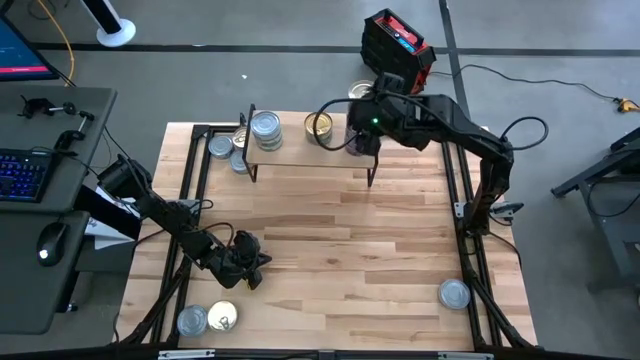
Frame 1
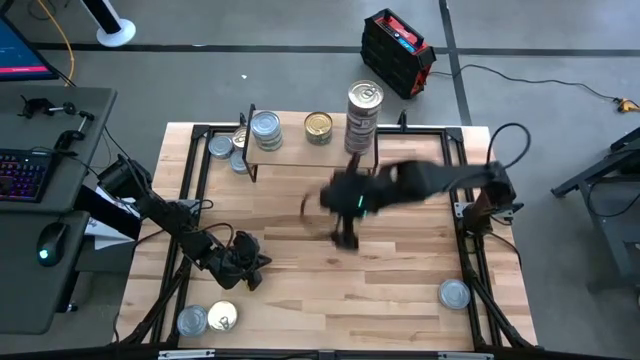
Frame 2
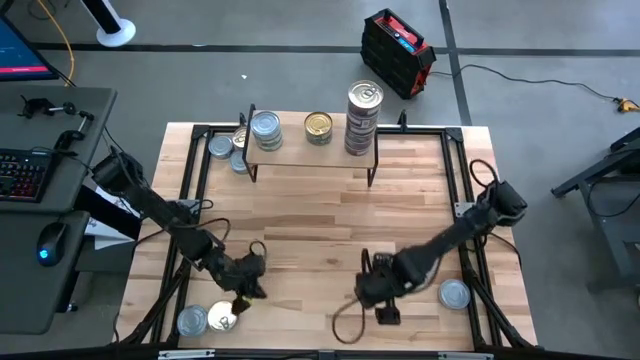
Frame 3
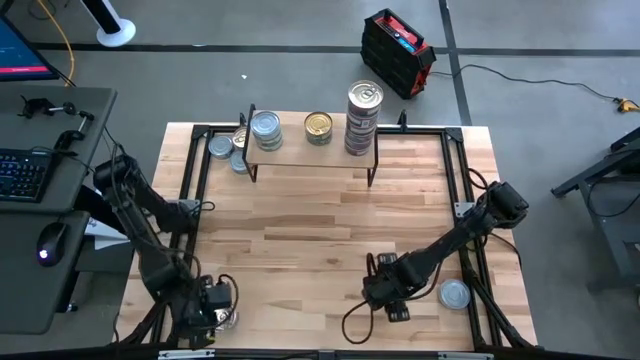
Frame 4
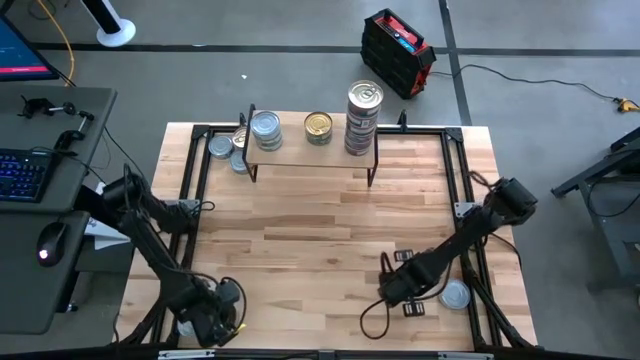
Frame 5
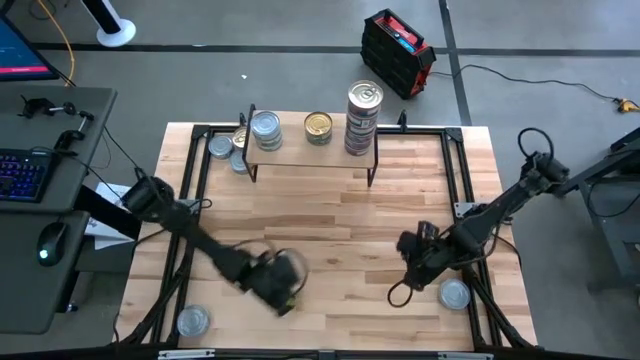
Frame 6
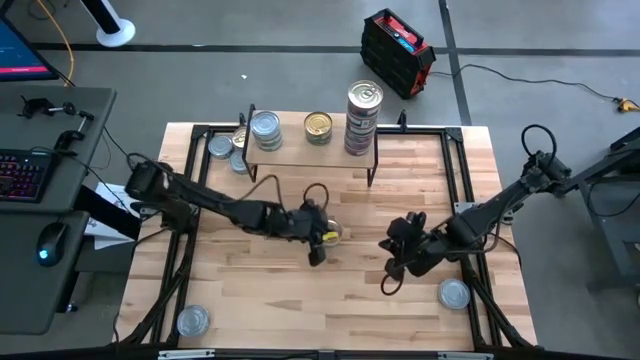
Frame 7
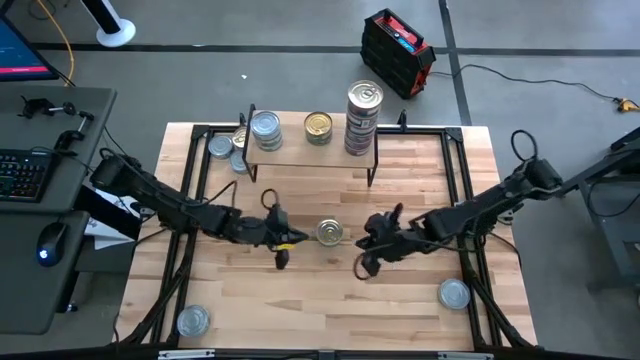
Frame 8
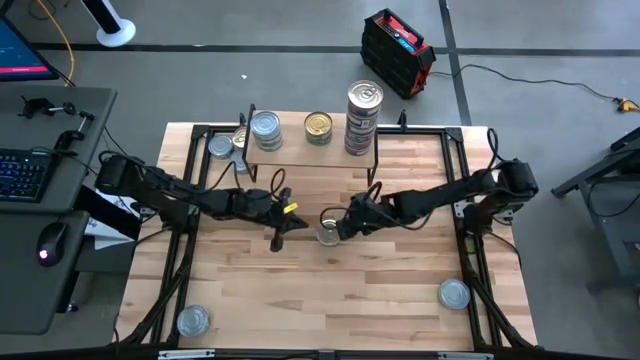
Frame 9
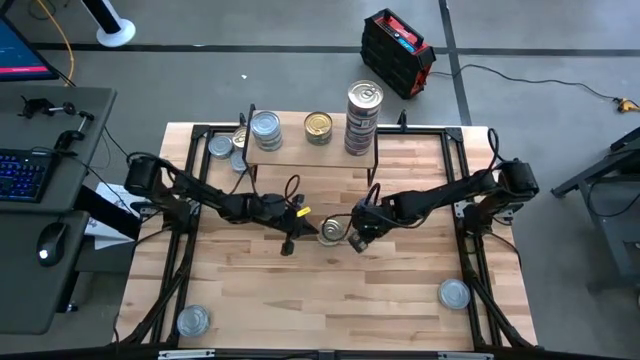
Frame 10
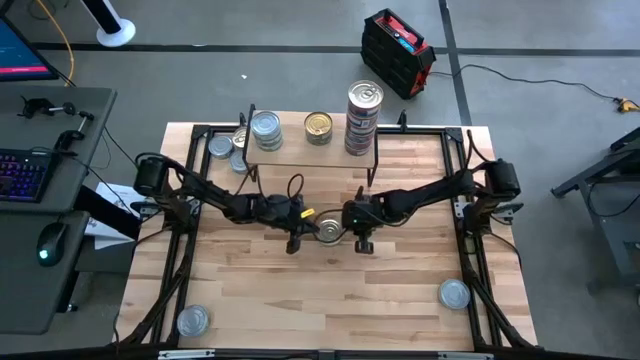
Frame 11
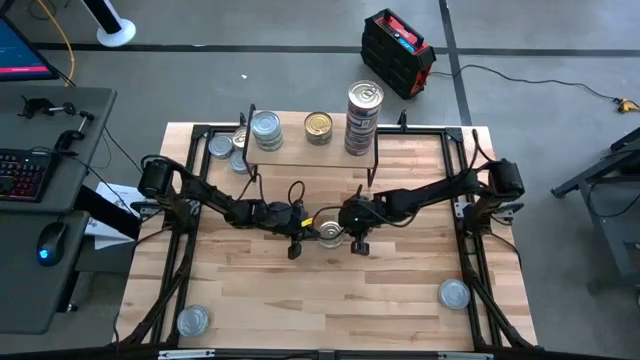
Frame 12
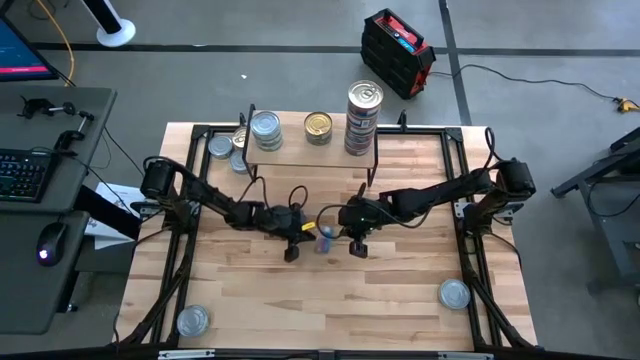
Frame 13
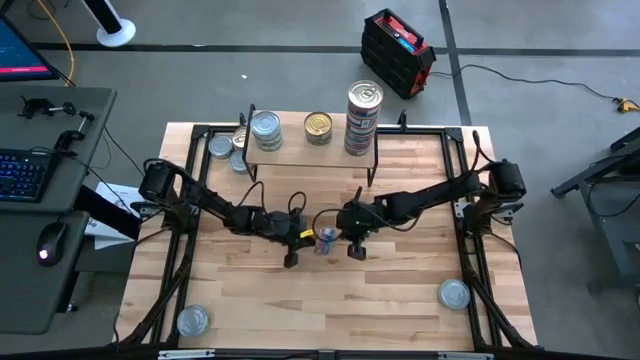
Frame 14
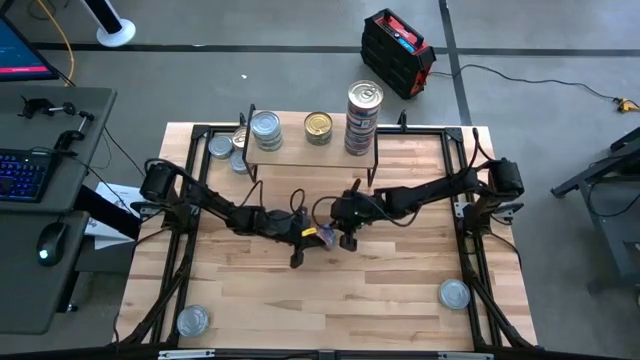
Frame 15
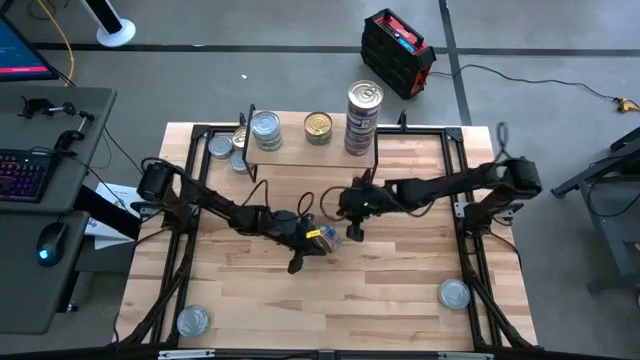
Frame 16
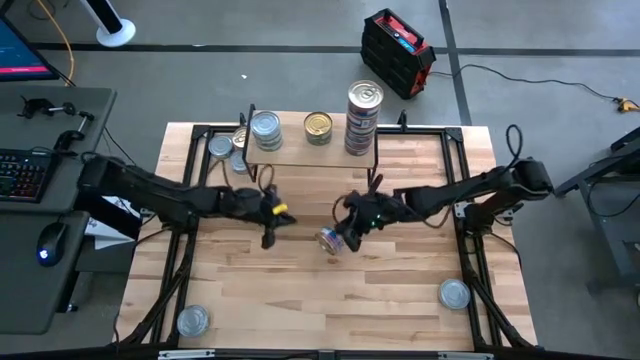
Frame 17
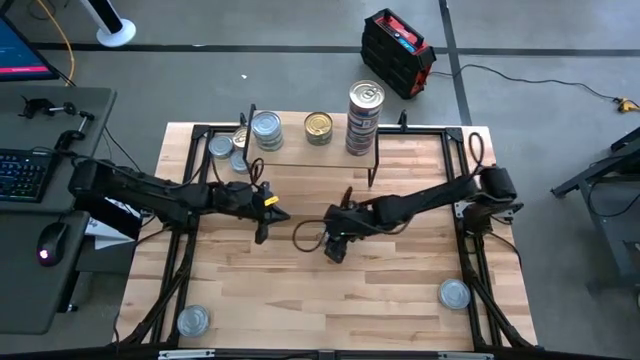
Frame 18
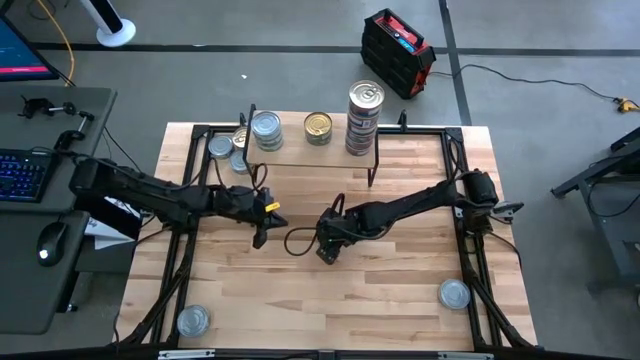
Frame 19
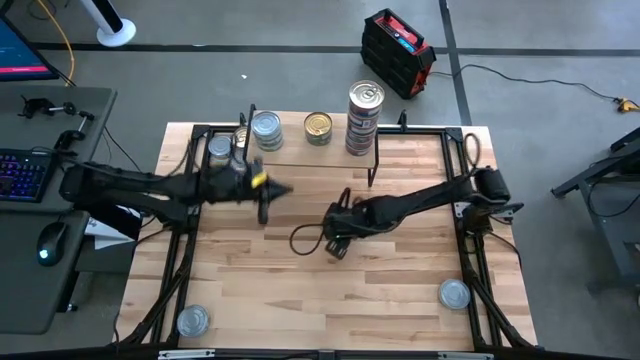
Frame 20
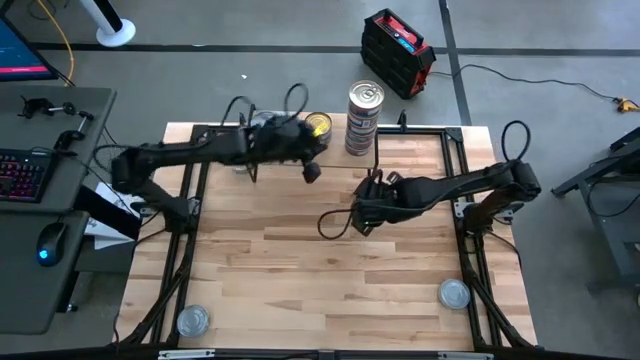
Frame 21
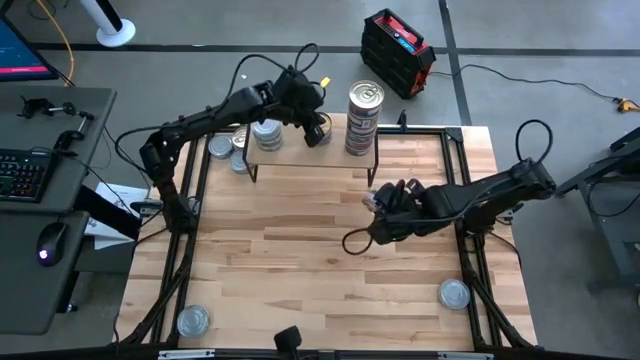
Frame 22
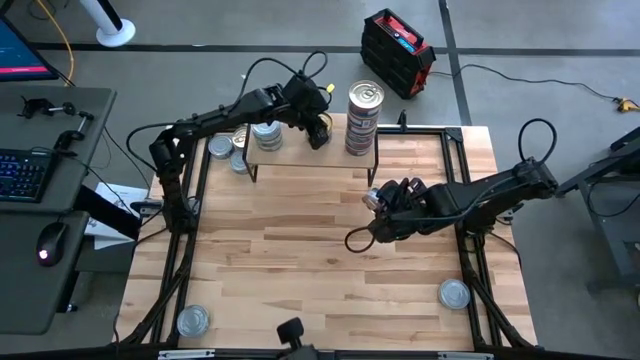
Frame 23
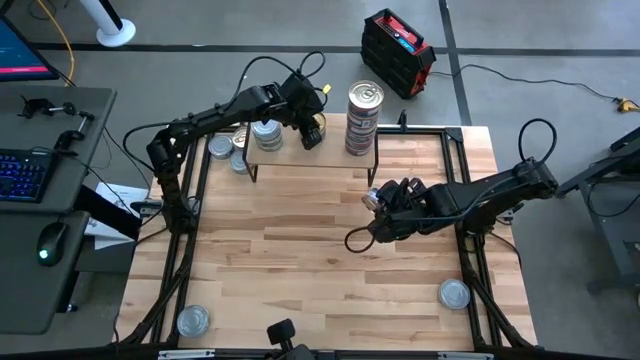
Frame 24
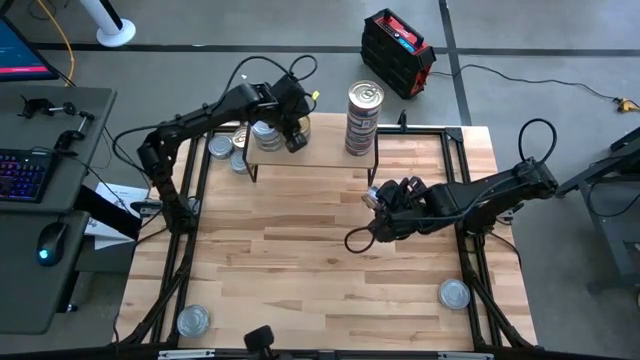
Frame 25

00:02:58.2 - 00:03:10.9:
Task: Stack canned seafood by type on shelf
Put the blue pink tuna can on the shelf

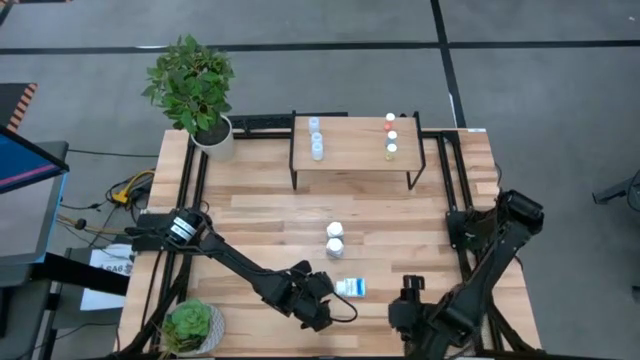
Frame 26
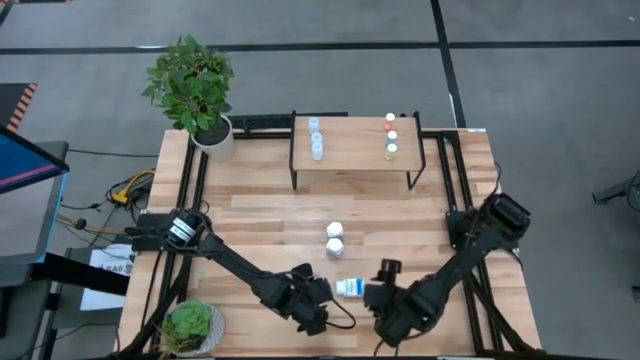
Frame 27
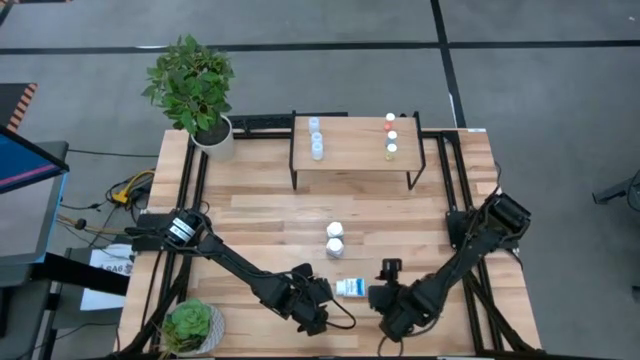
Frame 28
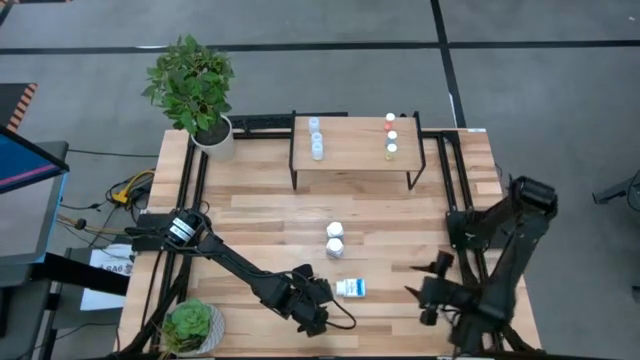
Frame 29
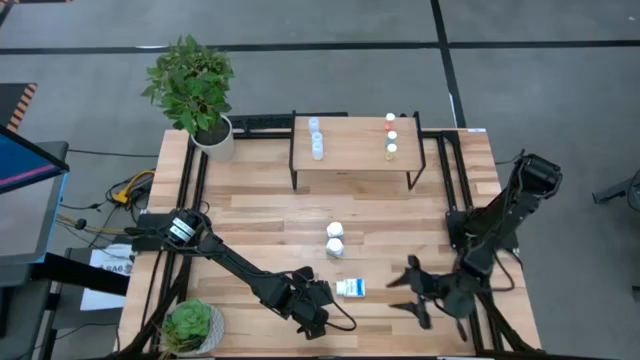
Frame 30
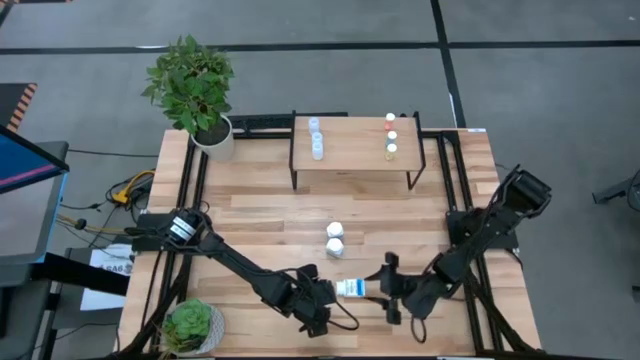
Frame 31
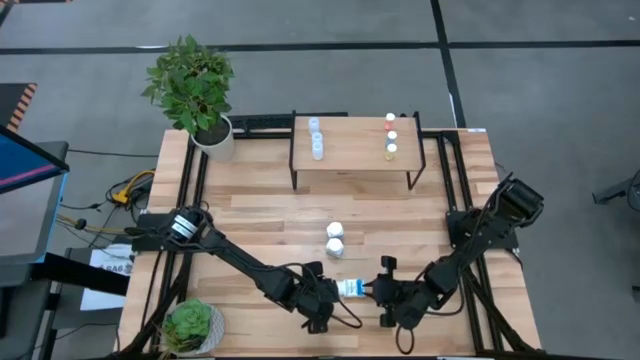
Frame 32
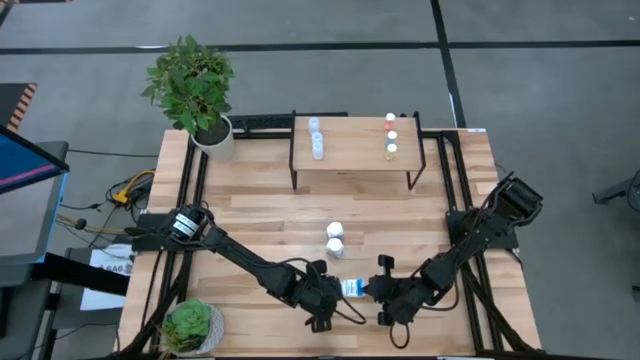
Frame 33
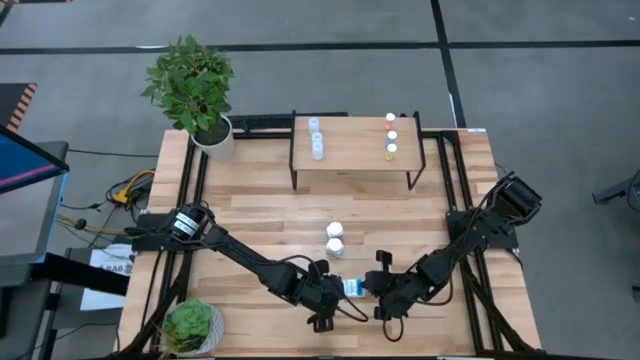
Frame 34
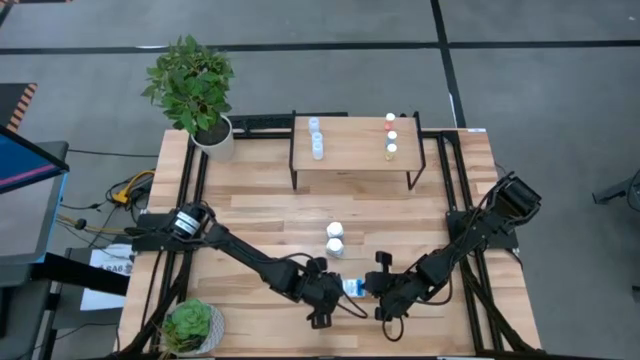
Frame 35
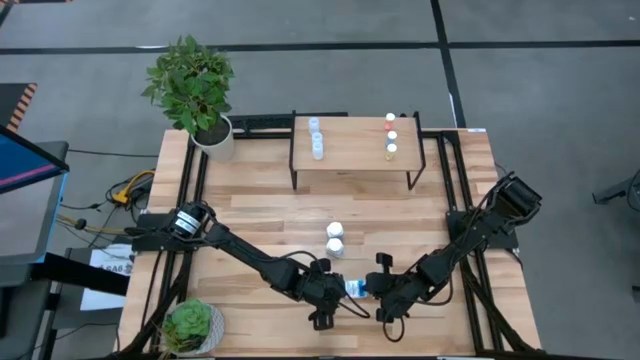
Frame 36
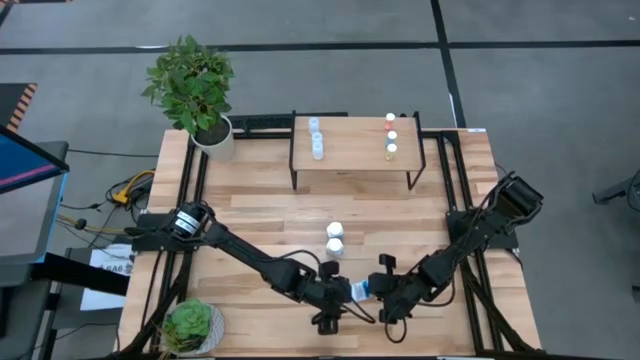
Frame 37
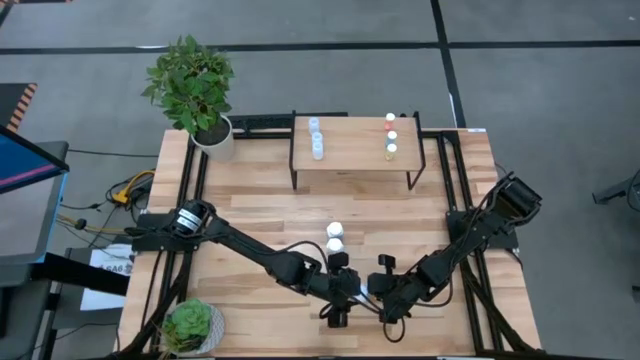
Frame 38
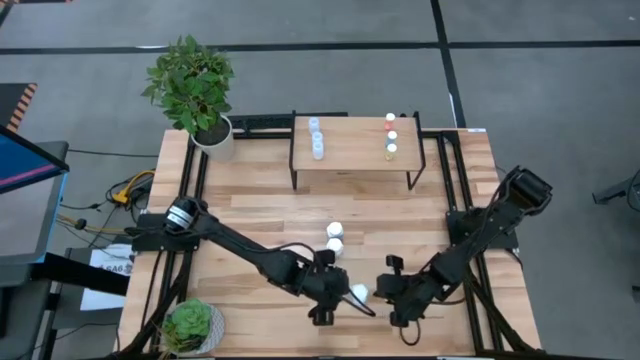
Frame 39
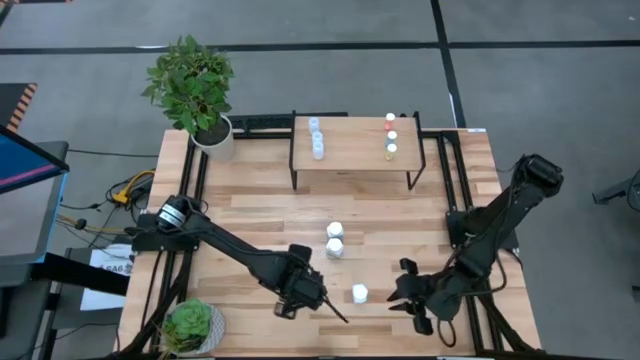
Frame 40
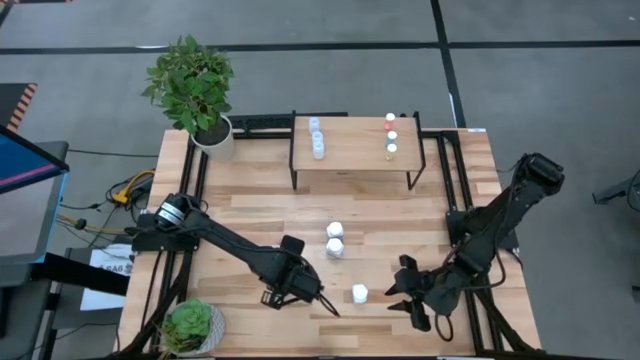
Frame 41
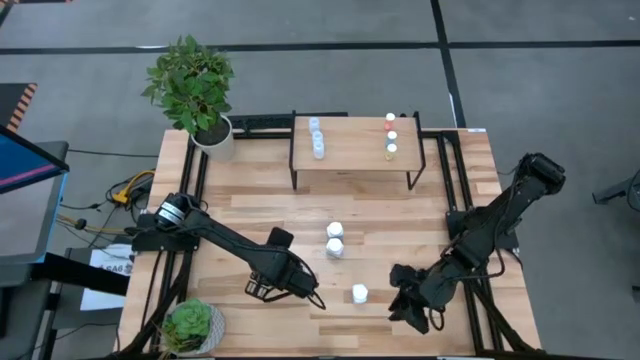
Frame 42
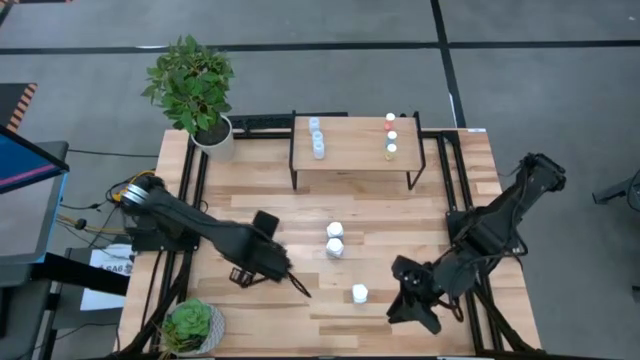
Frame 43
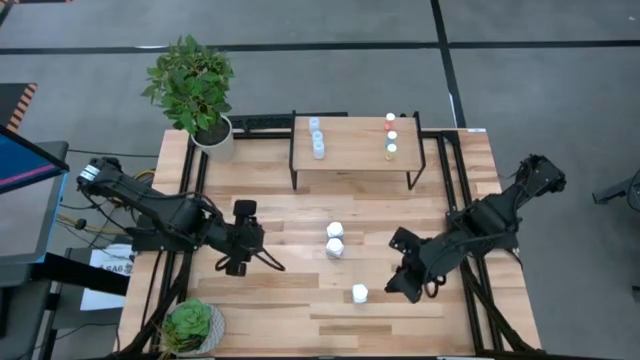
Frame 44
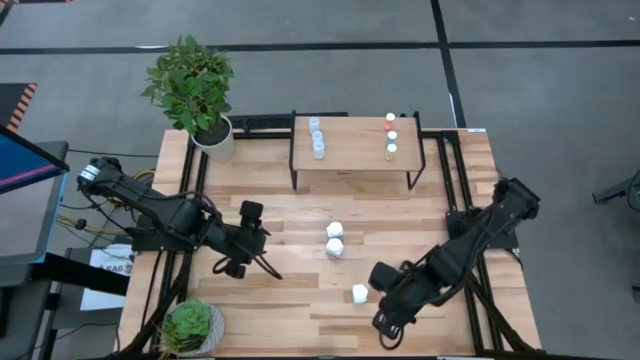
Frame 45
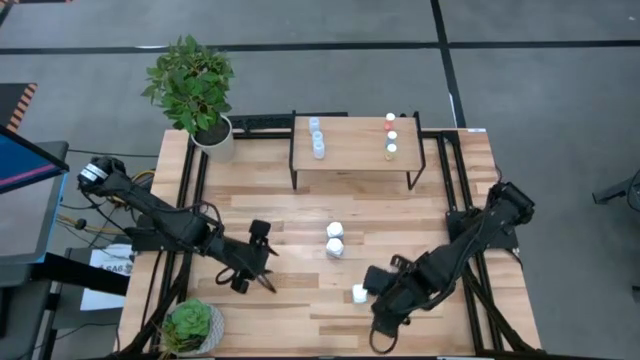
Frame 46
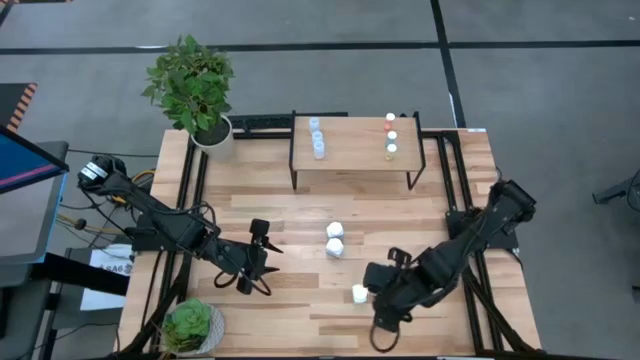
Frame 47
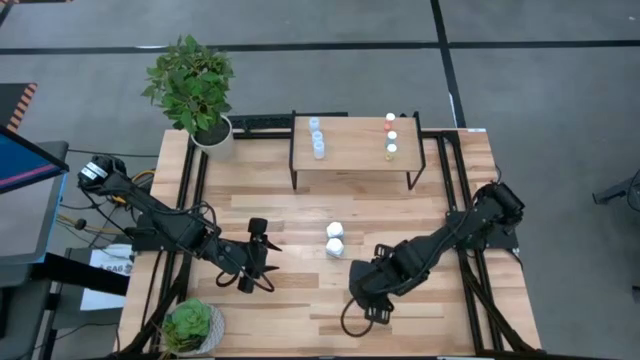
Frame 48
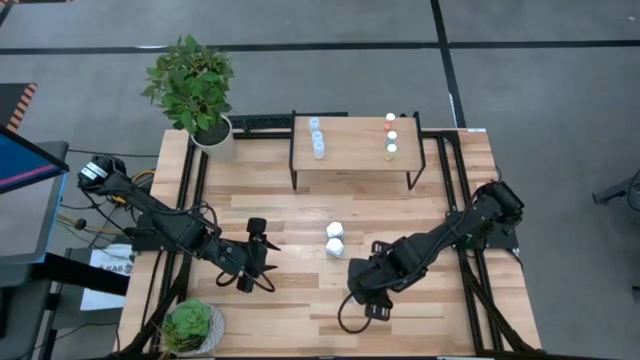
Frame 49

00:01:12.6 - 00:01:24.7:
Task: Pick and place medicine bottles onto shelf by color
Put the bottom white pill bottle on the shelf
